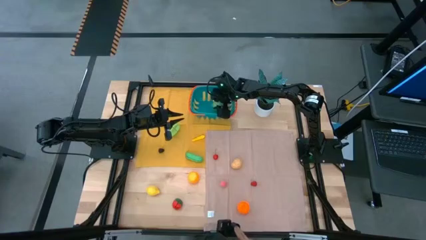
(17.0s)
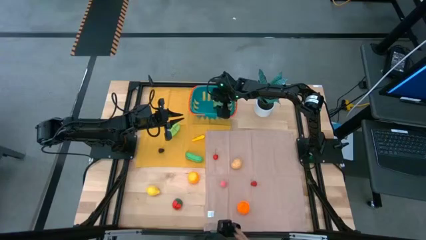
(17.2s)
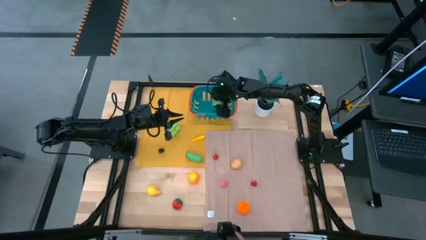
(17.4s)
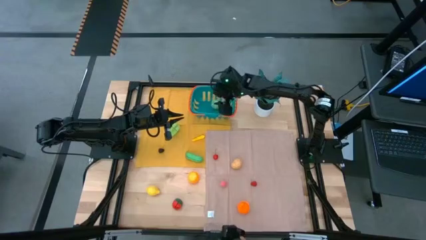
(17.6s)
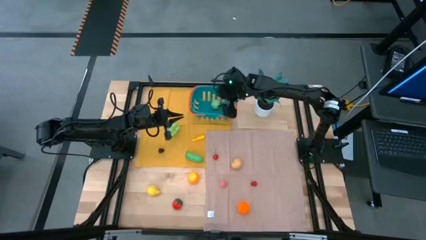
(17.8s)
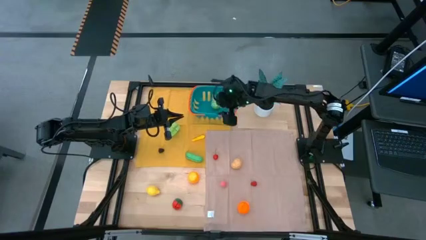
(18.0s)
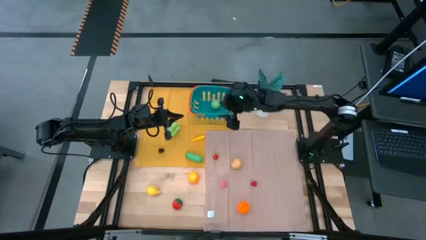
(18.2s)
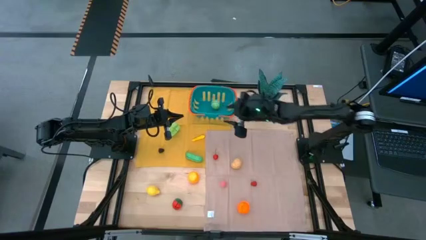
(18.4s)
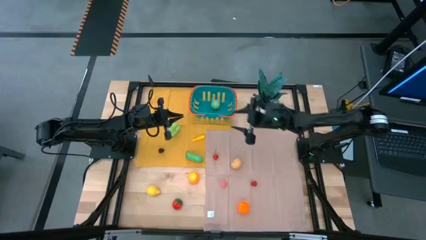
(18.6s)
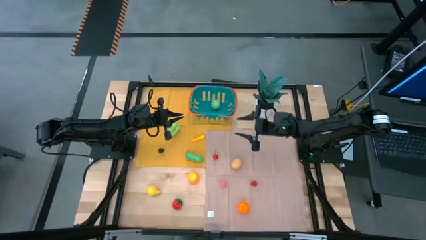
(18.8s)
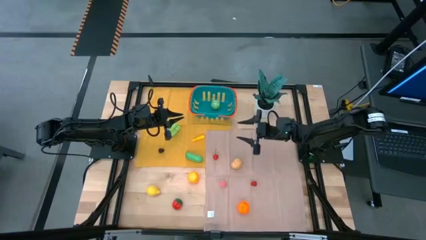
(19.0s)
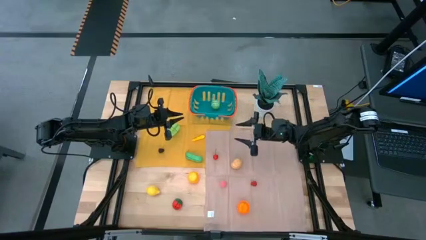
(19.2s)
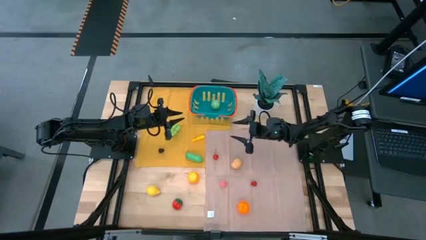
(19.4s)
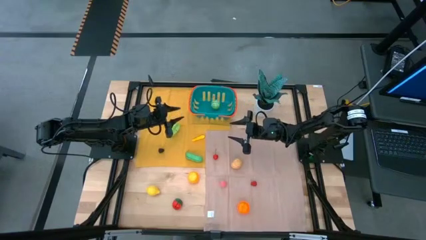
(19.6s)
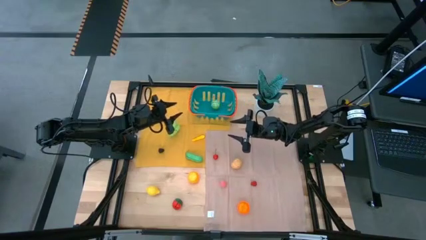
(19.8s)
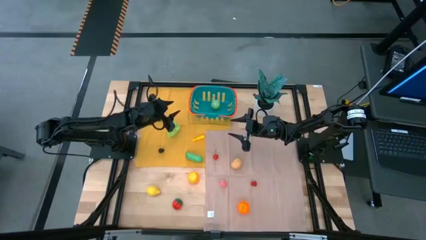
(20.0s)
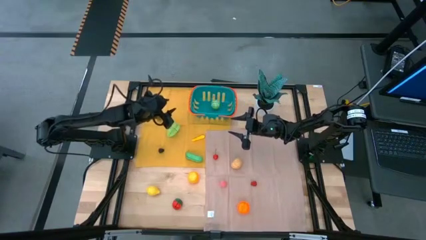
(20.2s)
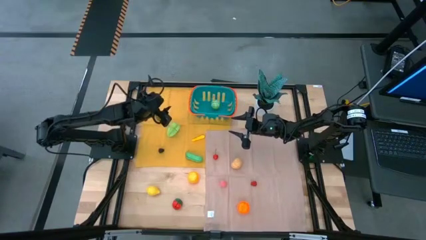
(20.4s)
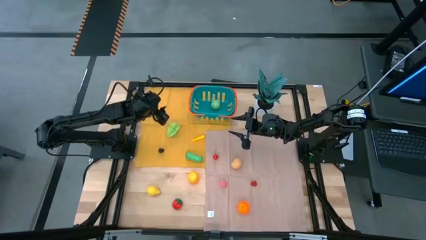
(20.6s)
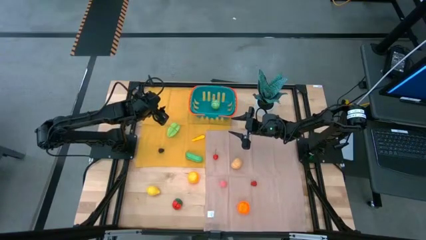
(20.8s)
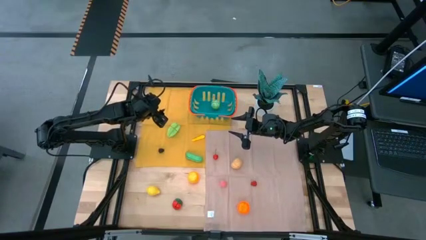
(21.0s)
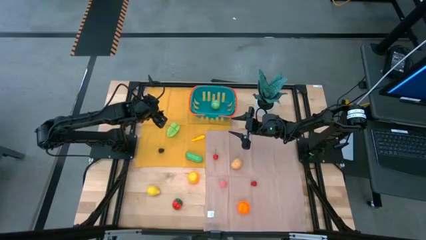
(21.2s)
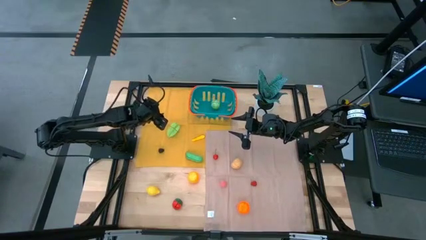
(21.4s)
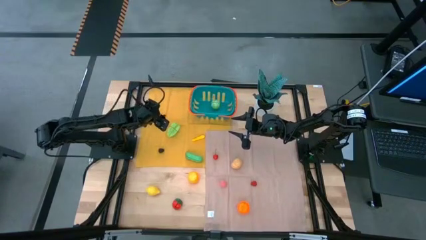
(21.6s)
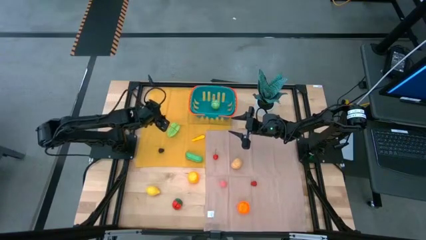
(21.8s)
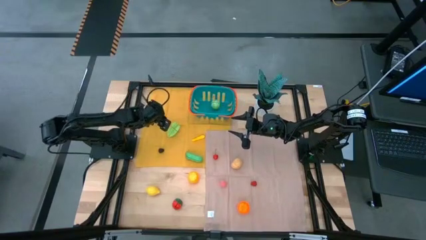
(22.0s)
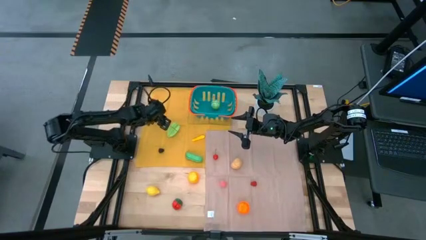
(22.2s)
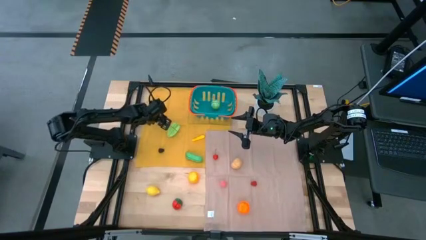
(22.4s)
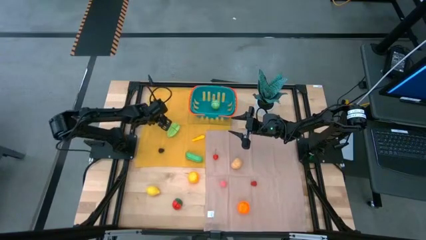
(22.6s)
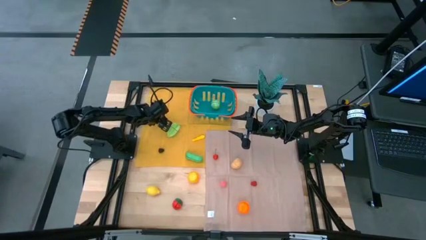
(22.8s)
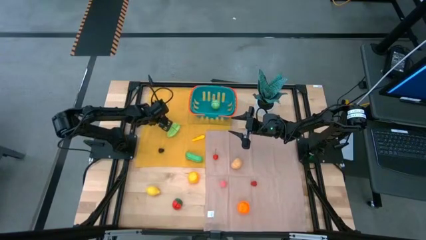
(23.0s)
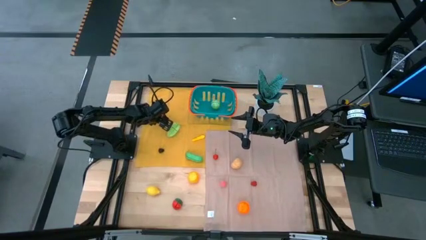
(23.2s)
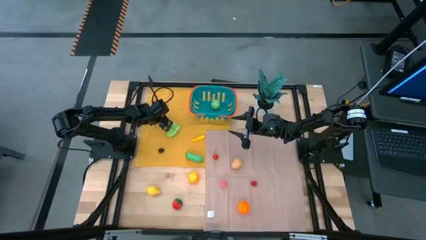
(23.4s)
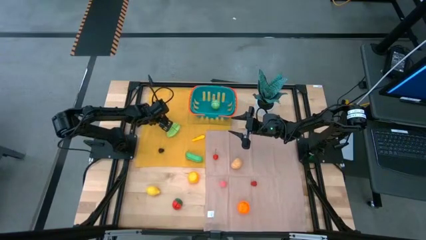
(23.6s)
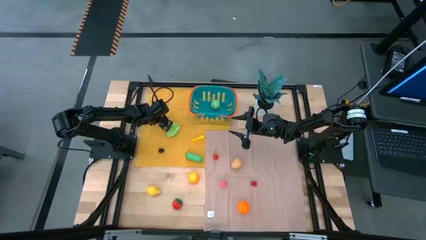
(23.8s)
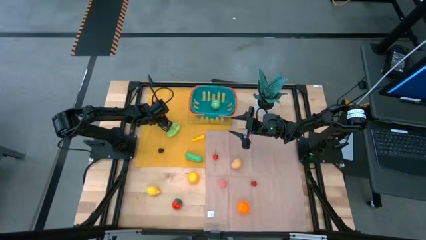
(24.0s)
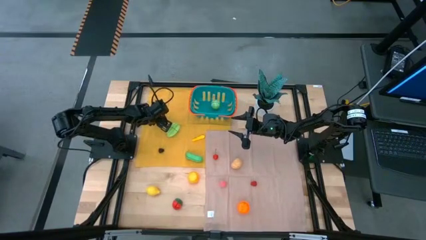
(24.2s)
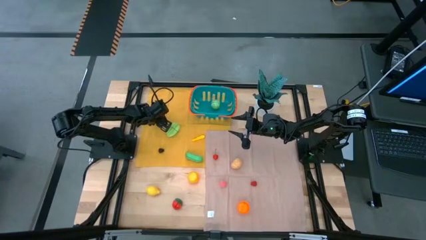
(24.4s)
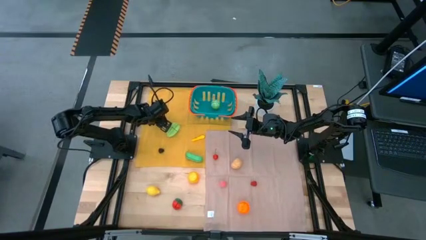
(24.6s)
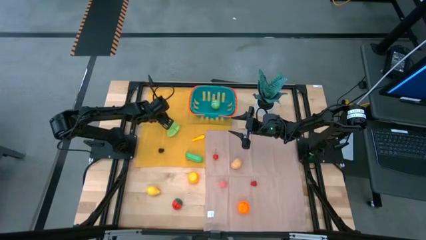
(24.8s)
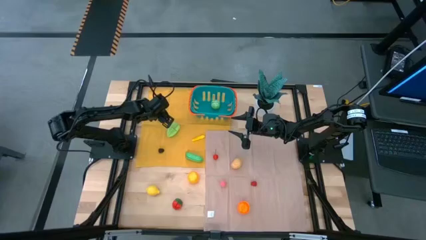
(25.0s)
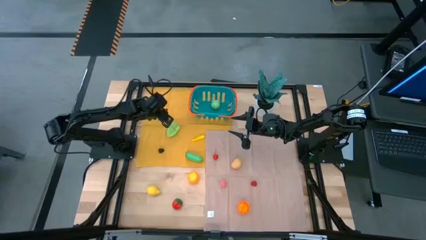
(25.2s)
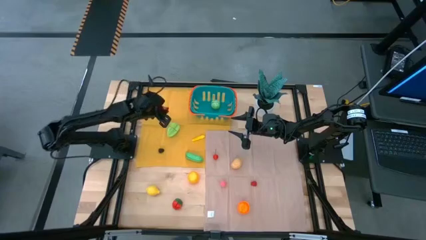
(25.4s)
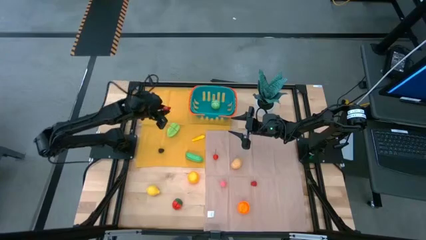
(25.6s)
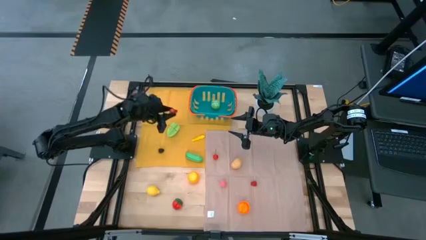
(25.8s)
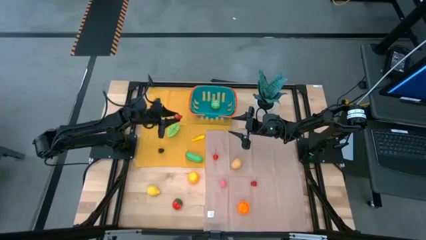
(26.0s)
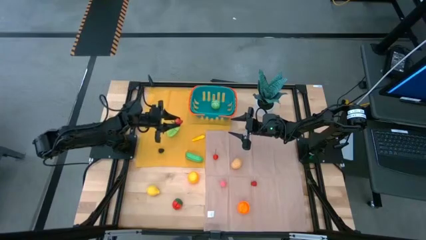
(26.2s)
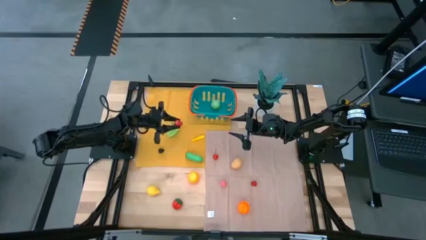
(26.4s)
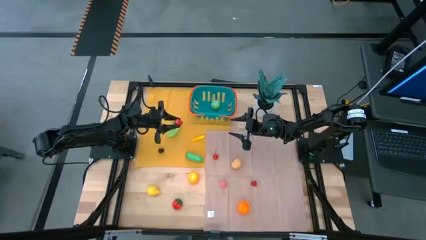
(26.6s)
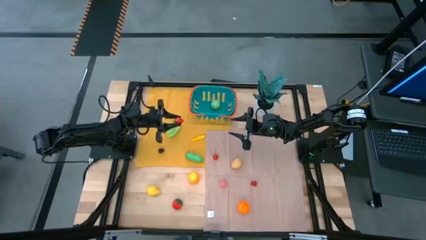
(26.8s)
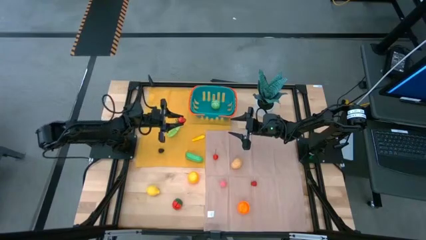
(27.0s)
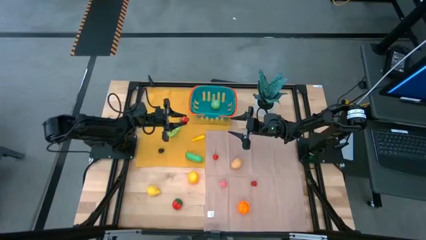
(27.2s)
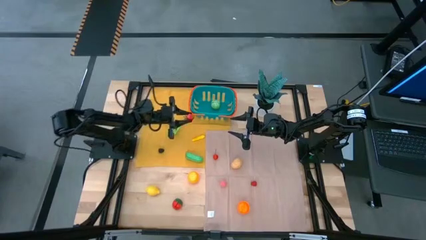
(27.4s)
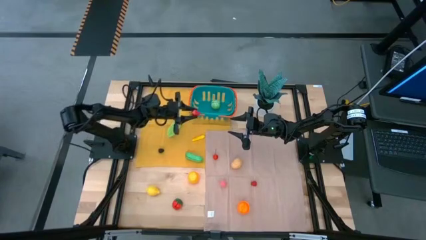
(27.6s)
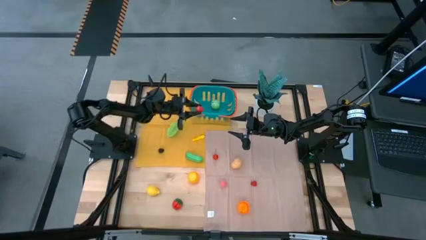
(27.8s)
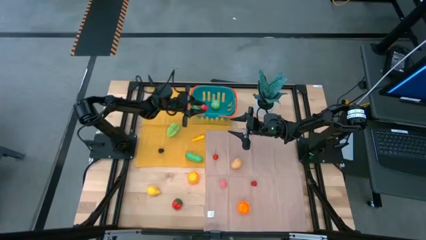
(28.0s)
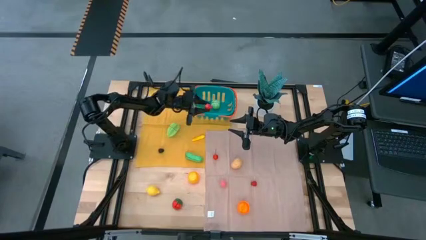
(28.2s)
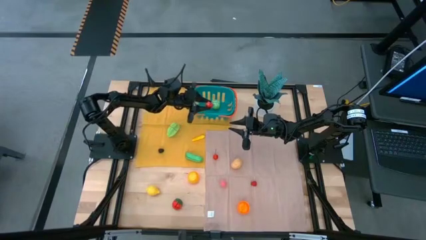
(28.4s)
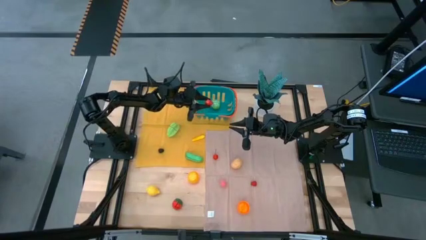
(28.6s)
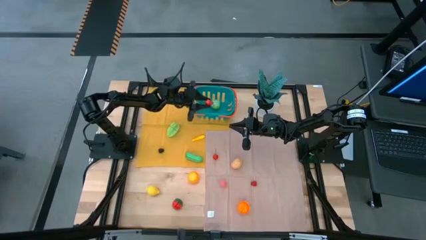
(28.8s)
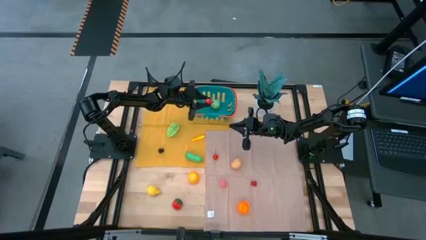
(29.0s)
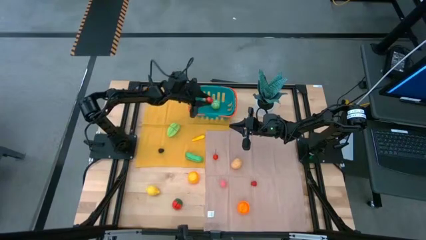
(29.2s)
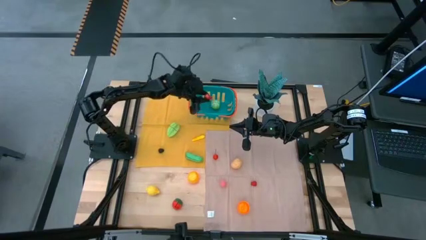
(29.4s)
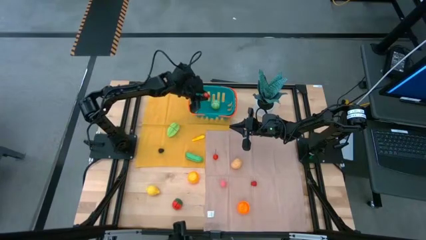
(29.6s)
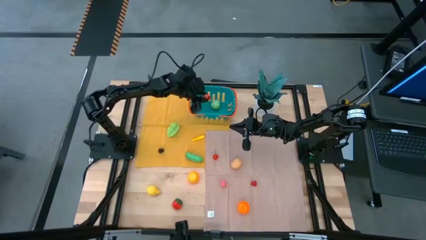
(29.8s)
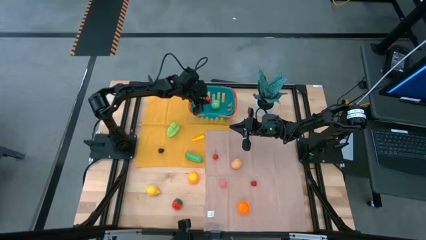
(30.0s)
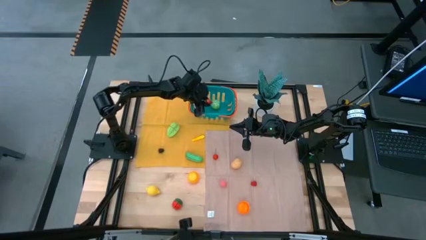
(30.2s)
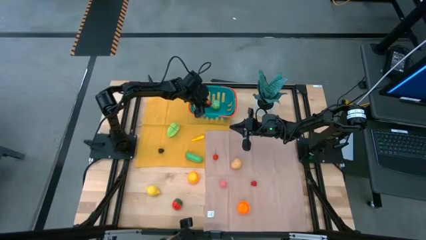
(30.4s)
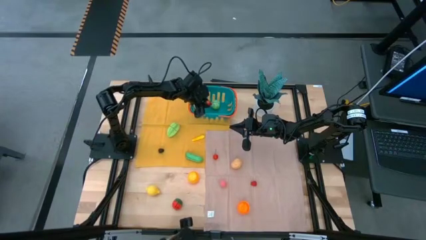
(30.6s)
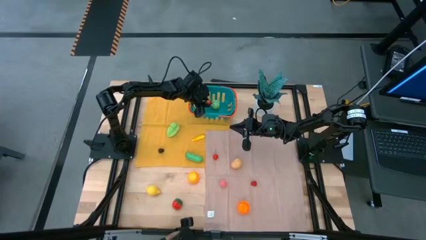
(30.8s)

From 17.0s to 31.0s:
Task: Pick and placing Produce into tupperware
Put the top red strawberry into the blue basket

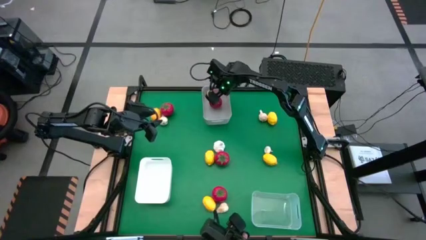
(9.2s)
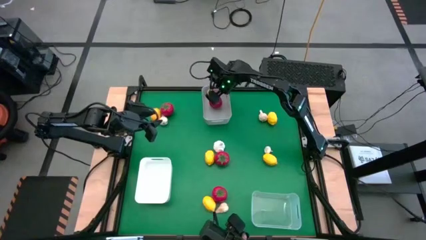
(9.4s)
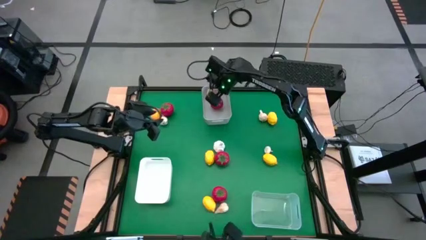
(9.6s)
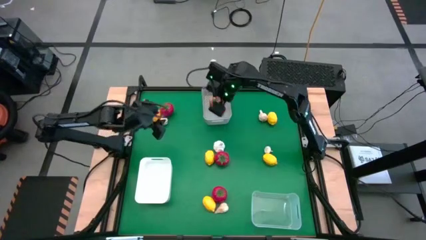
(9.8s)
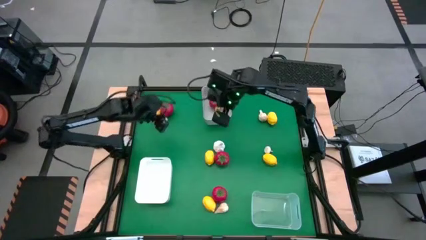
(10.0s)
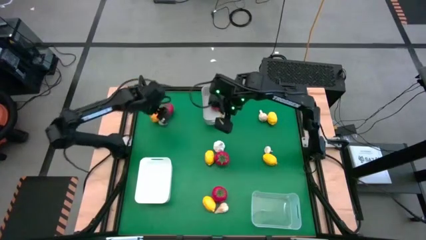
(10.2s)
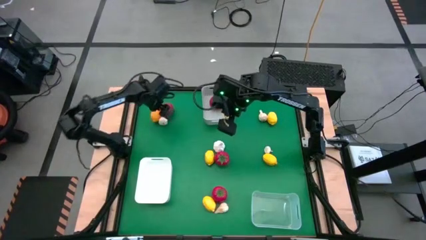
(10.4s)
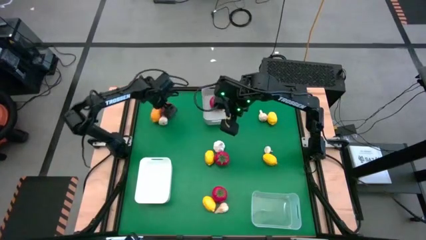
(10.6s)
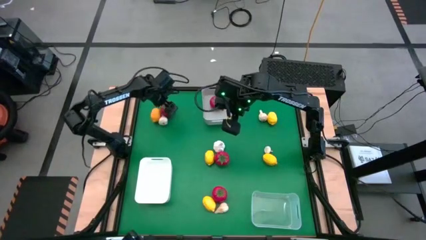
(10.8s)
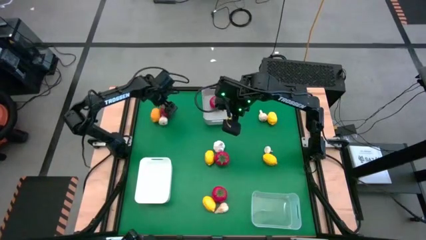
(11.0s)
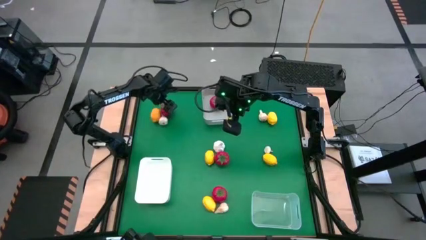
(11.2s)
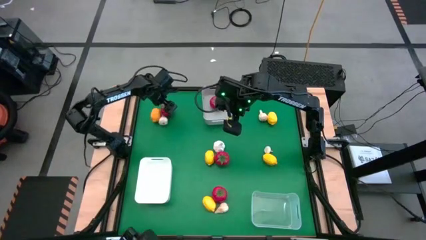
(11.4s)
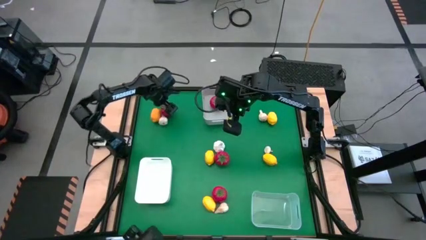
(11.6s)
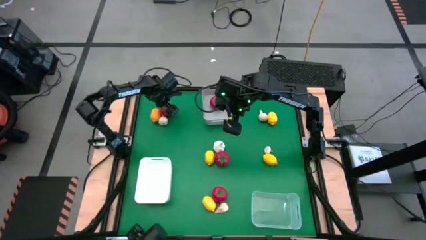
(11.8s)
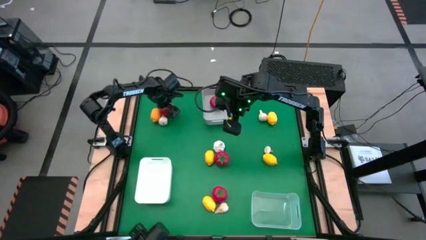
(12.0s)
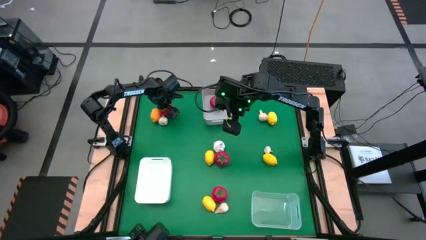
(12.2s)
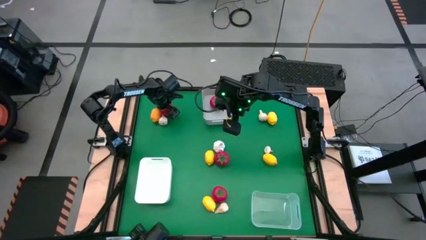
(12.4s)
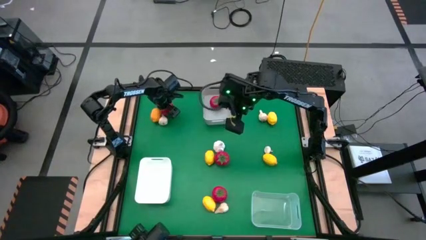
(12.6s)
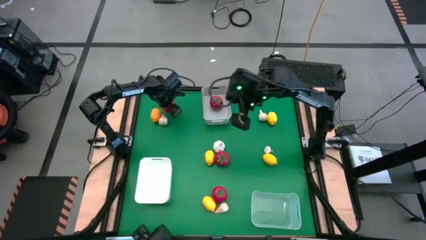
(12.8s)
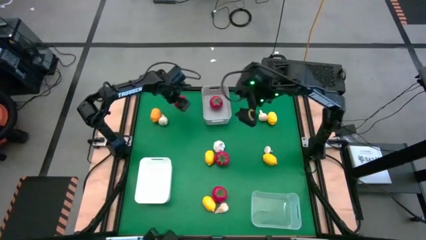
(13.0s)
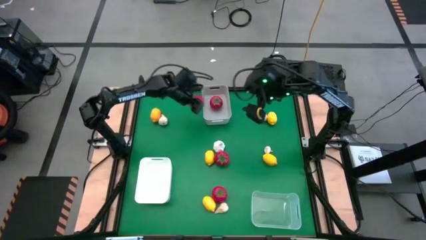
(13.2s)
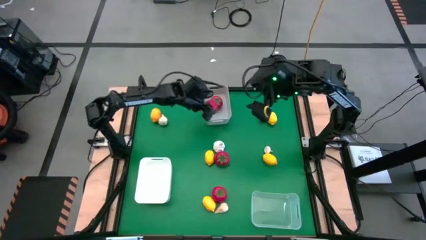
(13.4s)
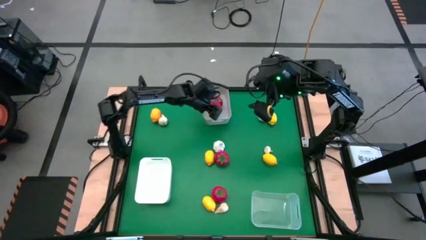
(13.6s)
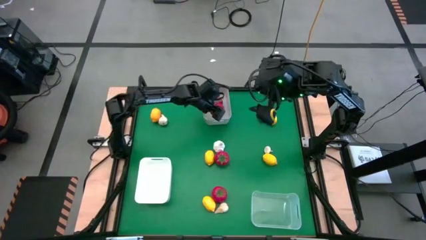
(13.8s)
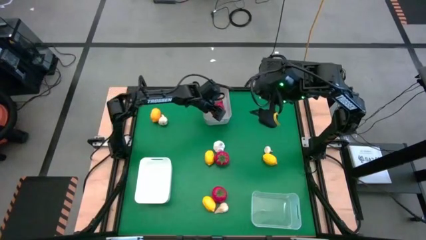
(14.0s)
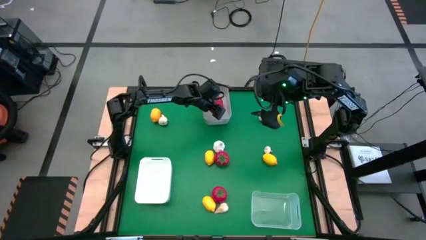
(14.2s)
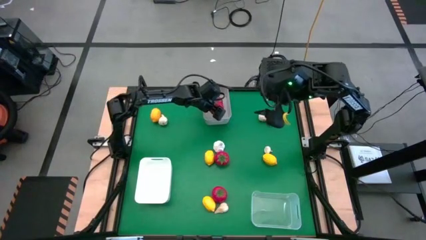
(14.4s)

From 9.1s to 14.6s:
Task: Sort produce into baskets
Put the top left tomato into the gray bin
